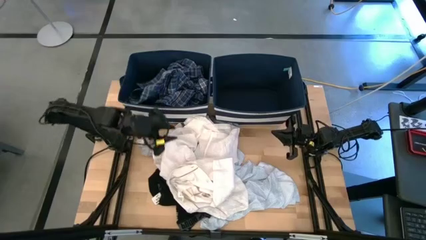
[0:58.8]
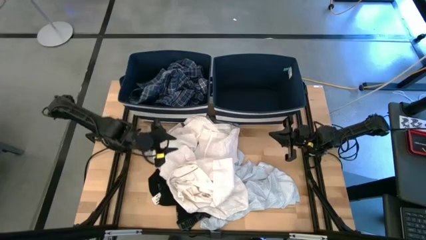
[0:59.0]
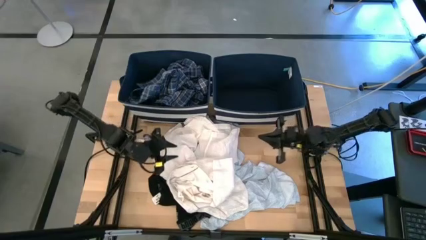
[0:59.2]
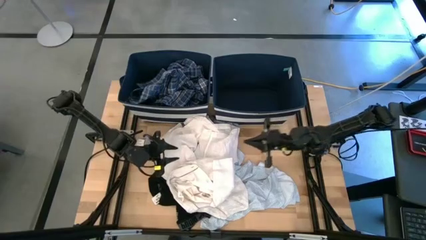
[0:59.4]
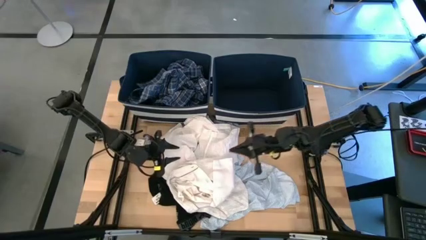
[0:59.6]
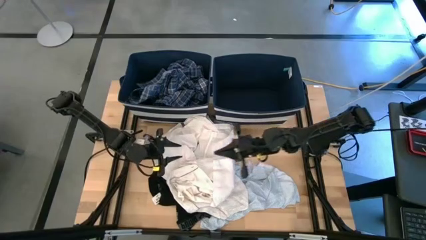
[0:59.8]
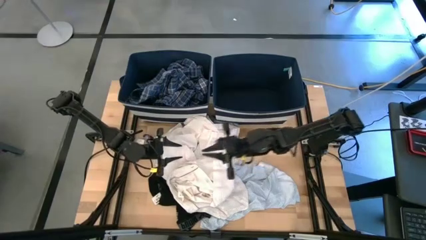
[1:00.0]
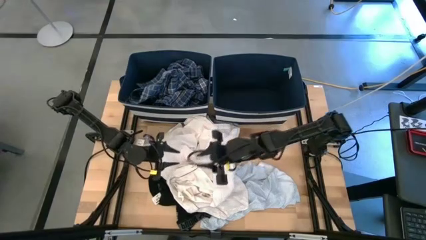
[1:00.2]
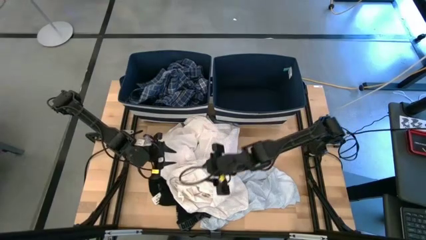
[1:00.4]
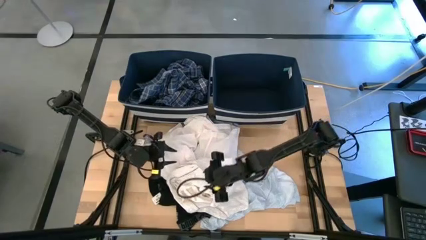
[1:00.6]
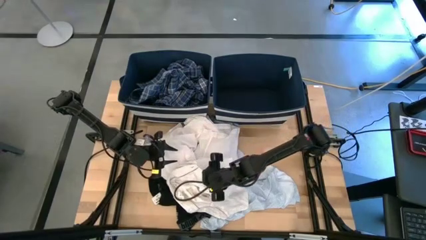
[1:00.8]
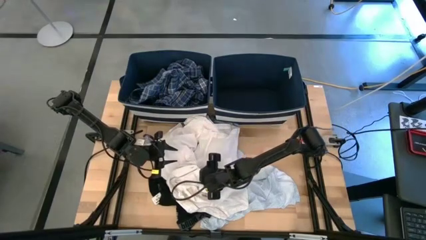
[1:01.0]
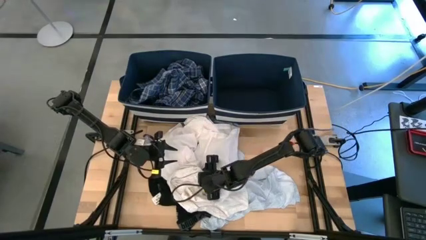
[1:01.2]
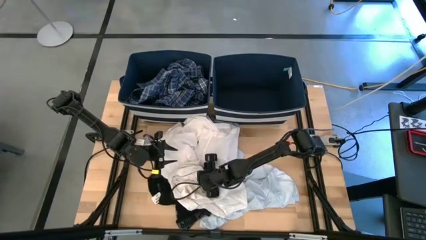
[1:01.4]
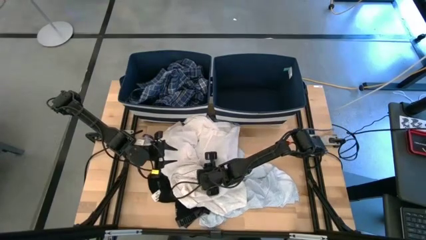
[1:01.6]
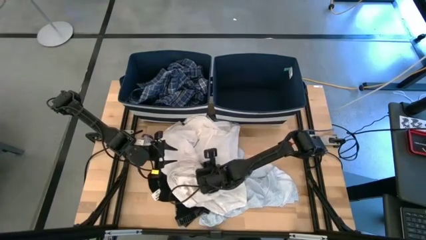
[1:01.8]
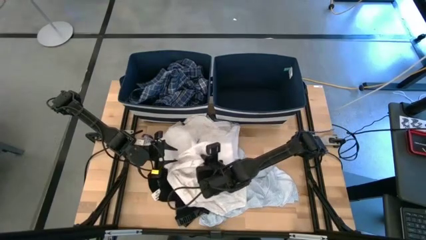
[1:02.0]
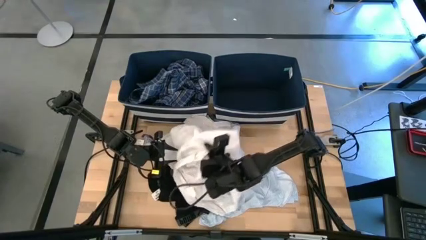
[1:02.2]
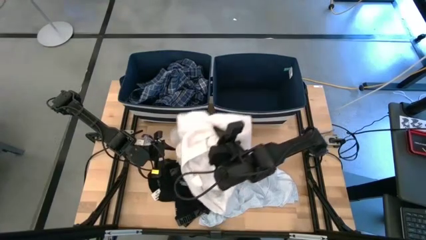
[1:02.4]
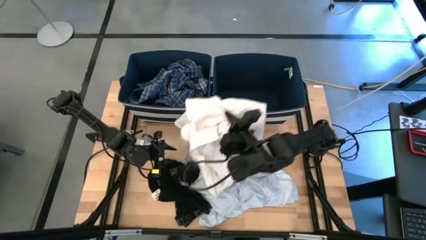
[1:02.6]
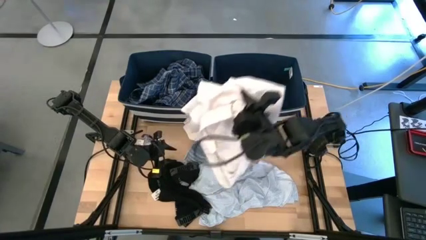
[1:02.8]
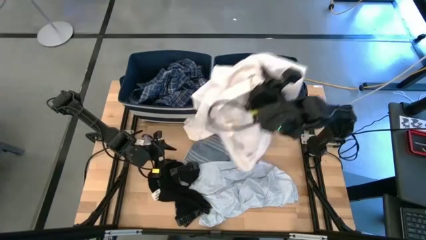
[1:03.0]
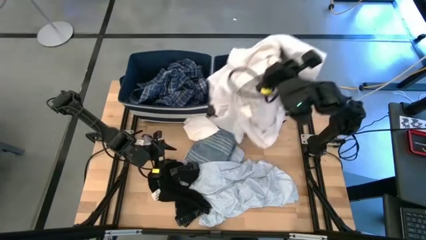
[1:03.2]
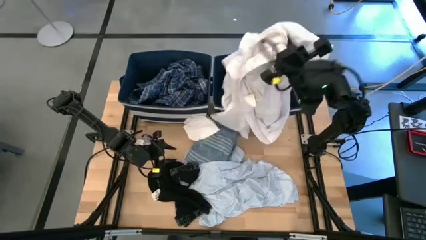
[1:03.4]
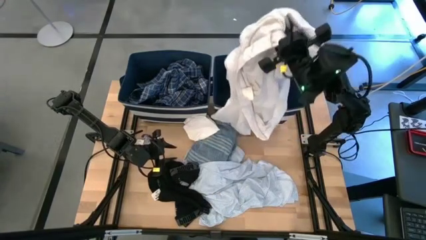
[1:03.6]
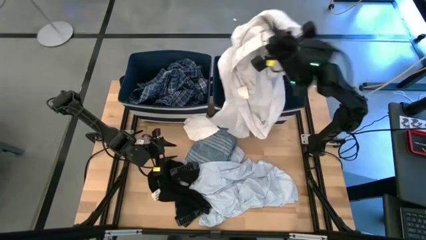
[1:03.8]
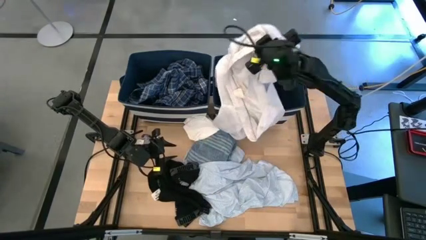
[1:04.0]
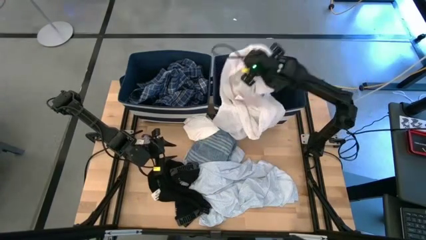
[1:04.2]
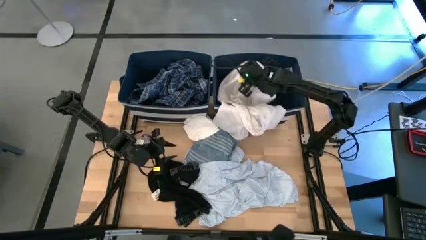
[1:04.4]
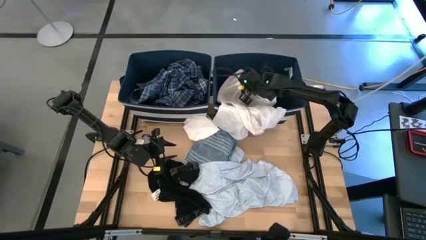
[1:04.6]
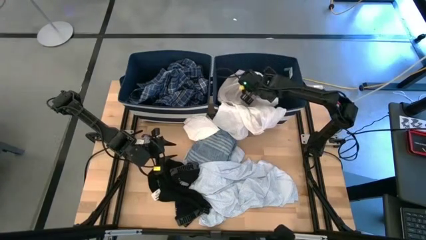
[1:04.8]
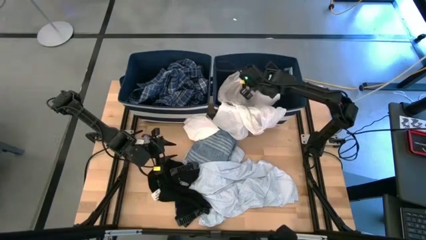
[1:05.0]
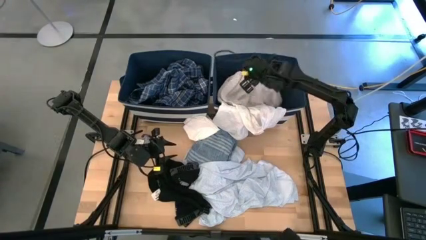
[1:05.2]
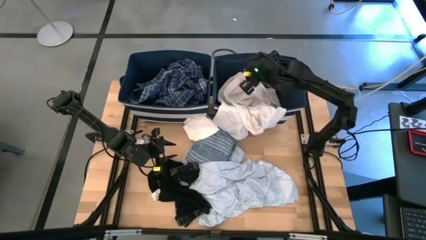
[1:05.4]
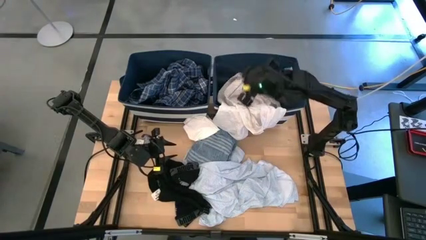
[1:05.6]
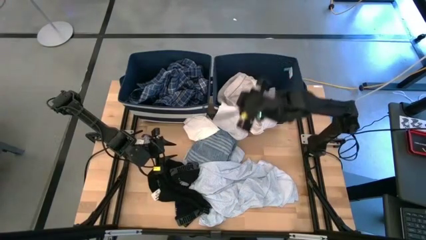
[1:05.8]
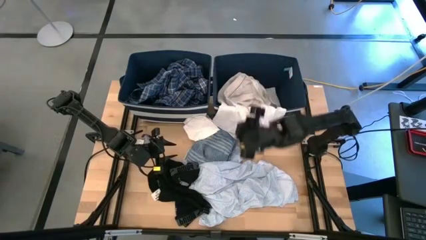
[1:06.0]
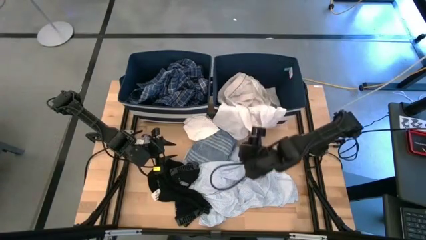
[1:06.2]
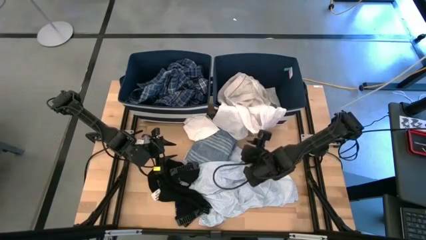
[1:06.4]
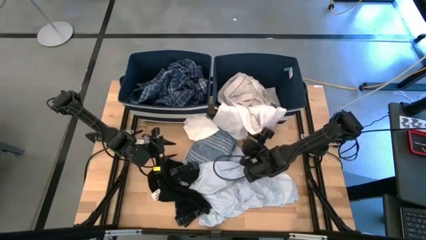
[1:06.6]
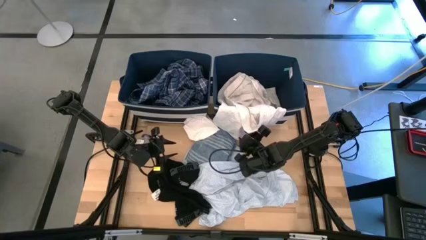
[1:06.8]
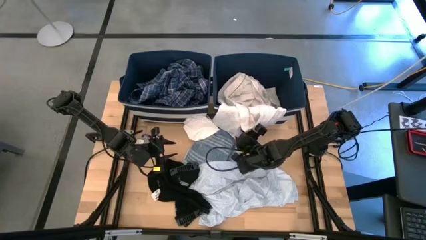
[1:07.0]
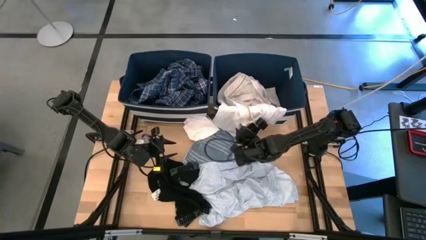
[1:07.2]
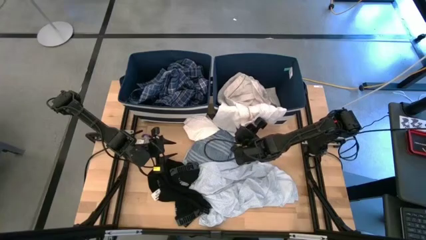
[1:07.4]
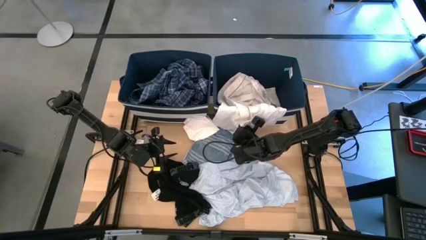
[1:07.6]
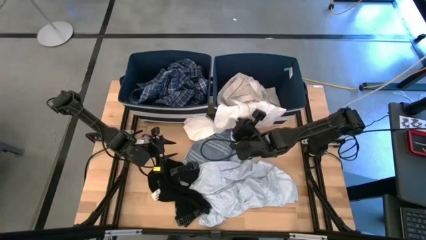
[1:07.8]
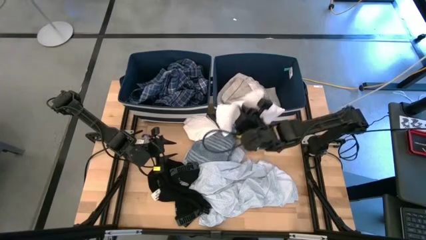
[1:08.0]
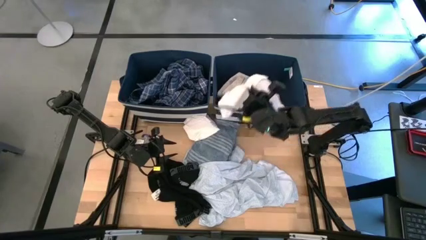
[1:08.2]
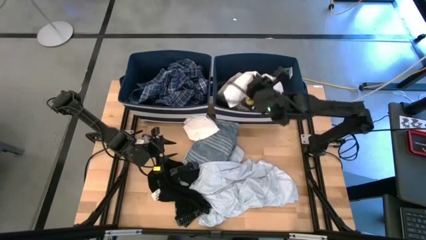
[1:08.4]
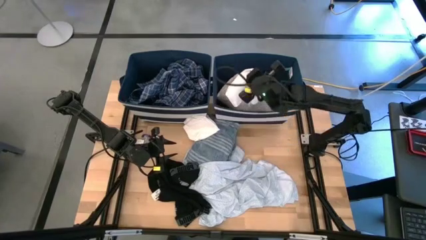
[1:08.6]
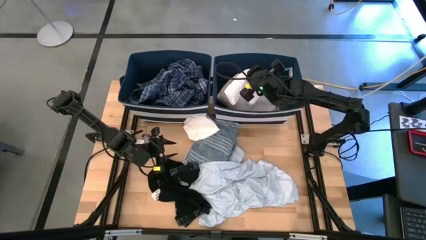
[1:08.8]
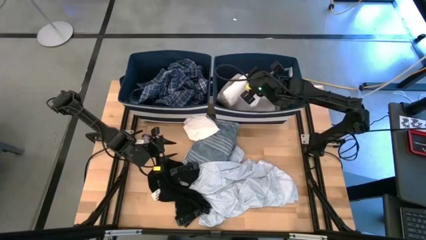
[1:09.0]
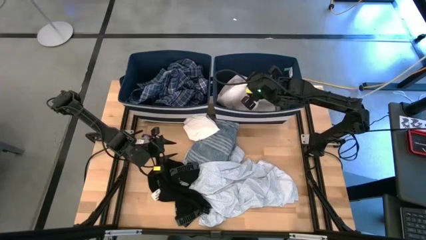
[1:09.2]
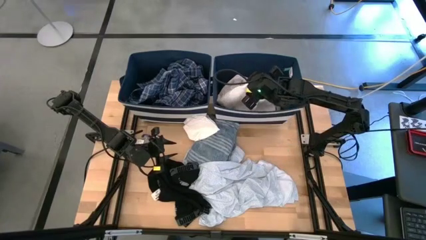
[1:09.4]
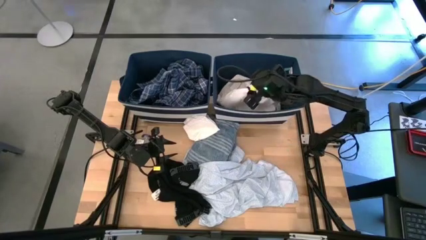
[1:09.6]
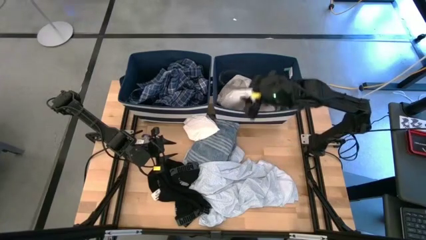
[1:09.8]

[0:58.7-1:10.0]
Task: Sort clothes
Put the white polo shirt into the right blue laundry bin

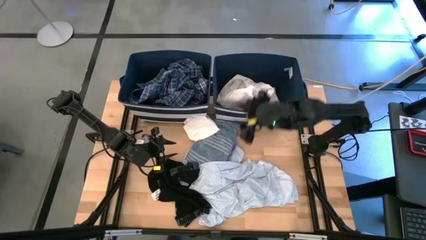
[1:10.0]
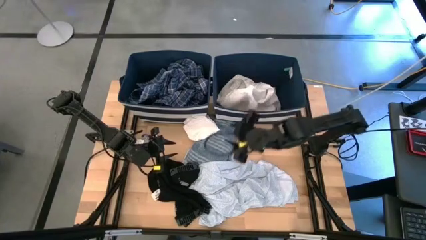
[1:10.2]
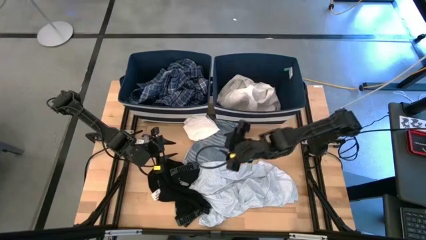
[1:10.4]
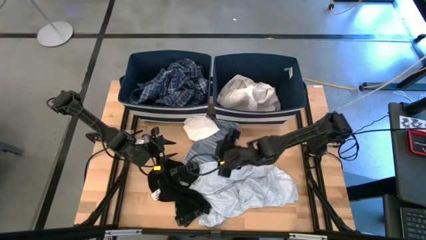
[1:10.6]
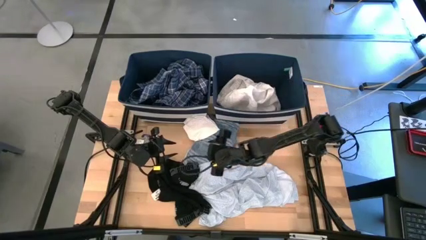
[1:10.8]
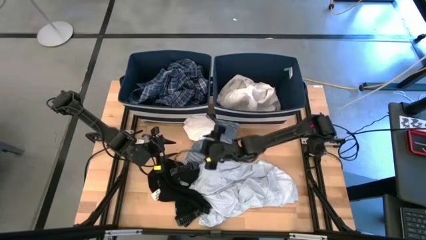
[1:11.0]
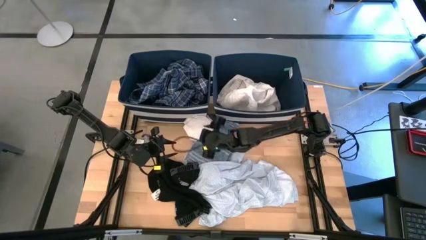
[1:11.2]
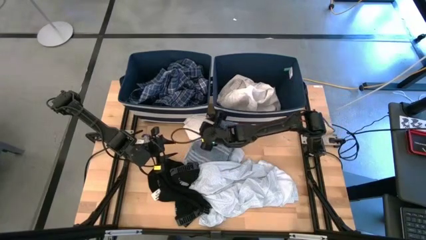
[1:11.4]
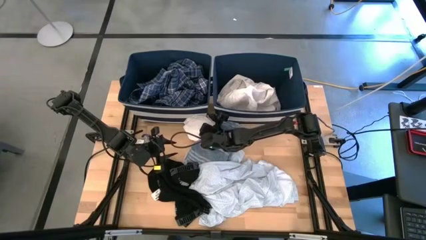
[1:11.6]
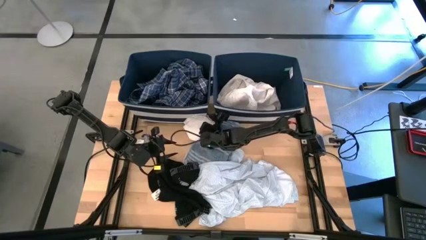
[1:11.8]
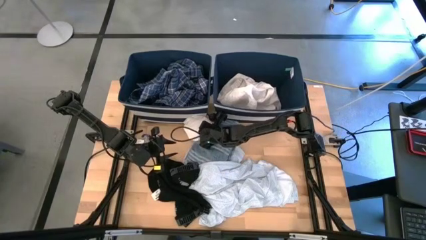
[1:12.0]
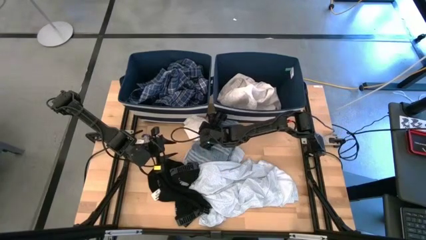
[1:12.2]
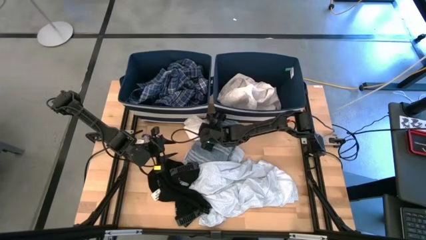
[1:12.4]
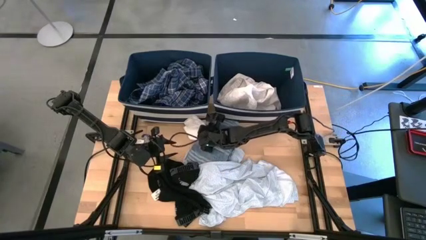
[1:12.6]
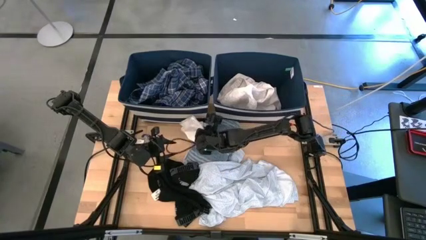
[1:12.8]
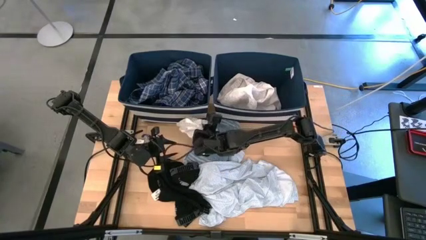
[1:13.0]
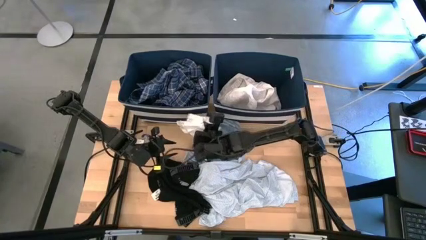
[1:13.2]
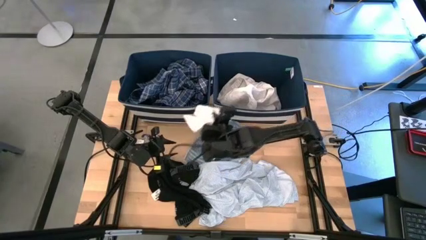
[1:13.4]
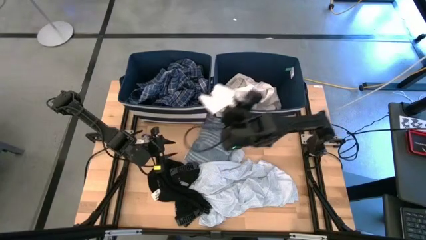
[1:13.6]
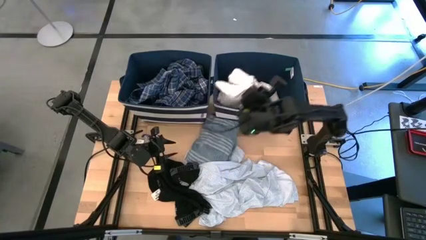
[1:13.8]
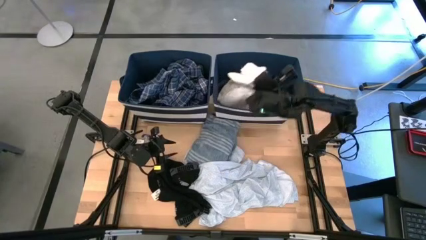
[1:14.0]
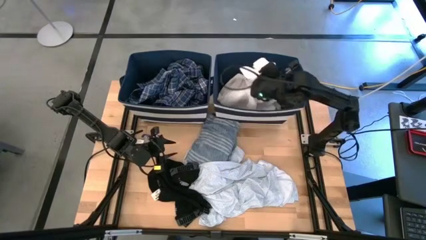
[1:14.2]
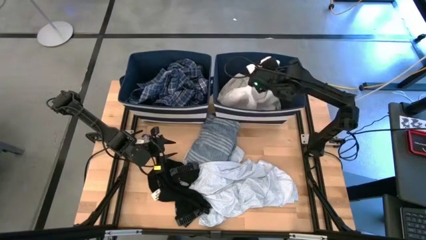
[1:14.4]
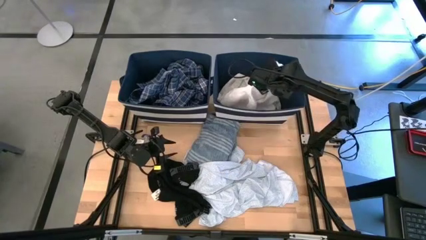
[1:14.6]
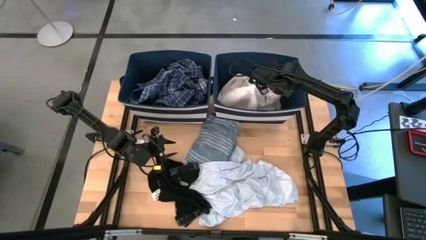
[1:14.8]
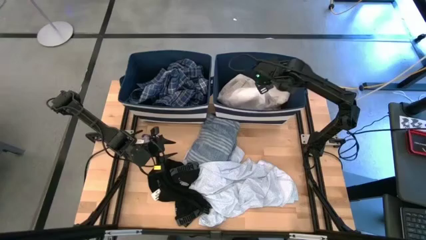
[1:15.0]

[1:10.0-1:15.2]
Put the white socks into the right blue laundry bin
